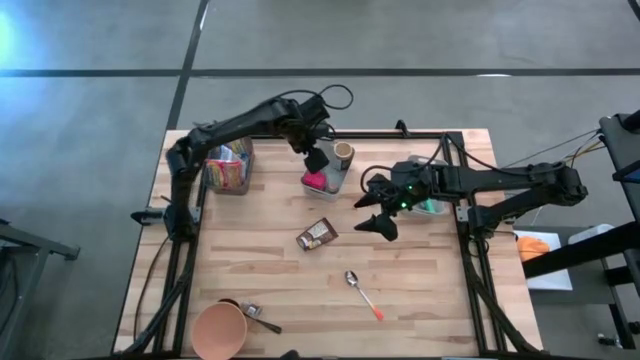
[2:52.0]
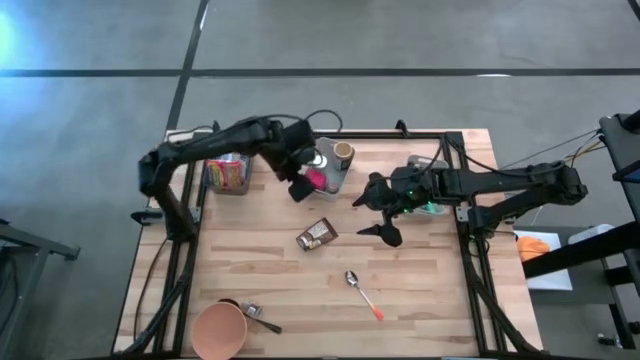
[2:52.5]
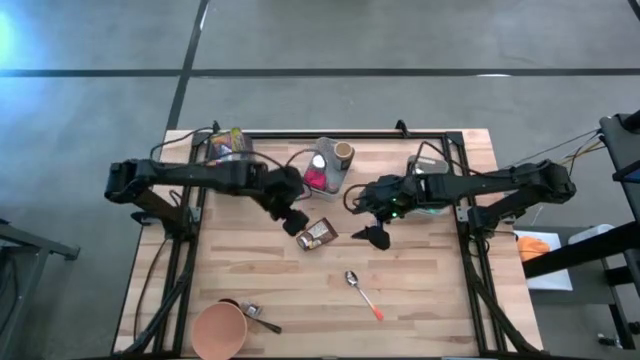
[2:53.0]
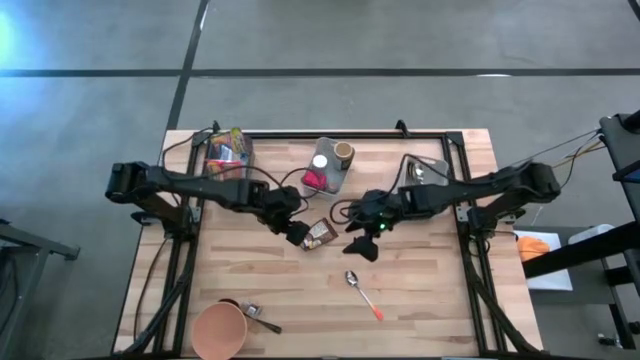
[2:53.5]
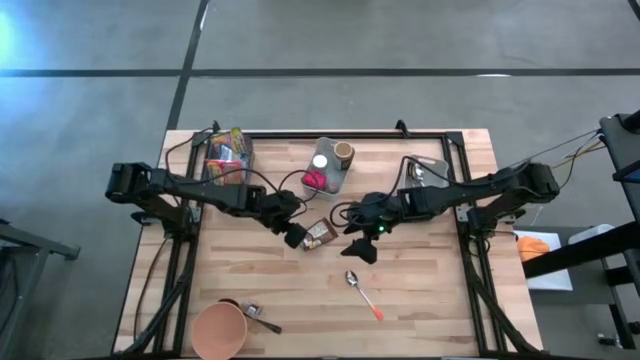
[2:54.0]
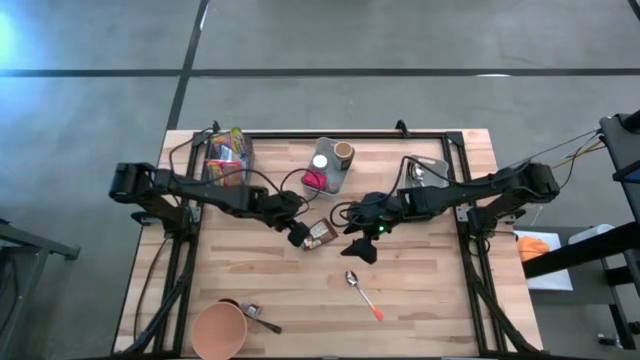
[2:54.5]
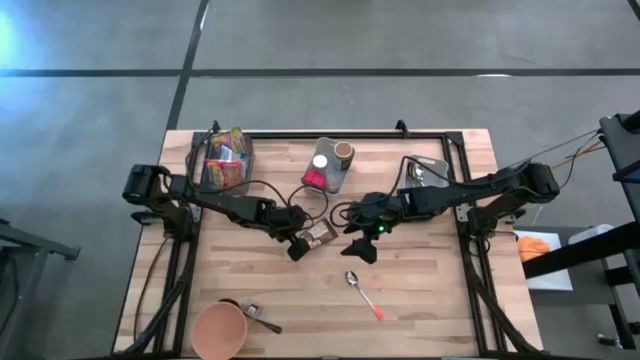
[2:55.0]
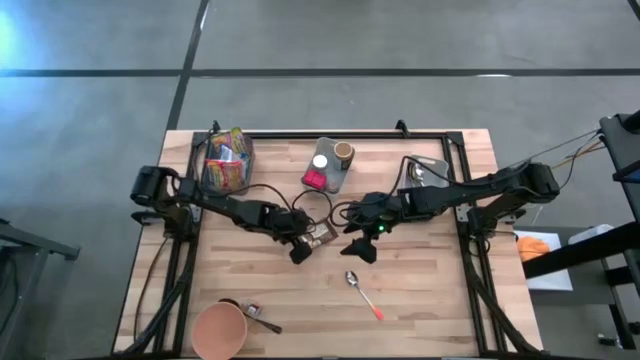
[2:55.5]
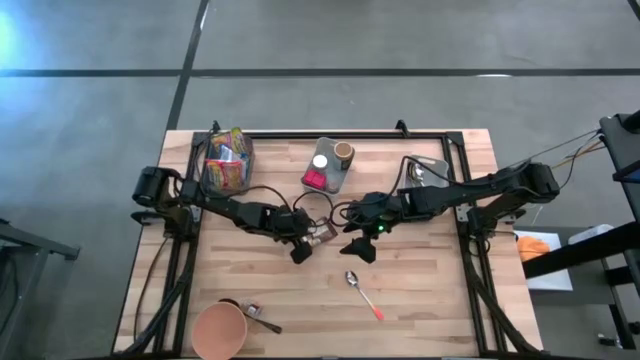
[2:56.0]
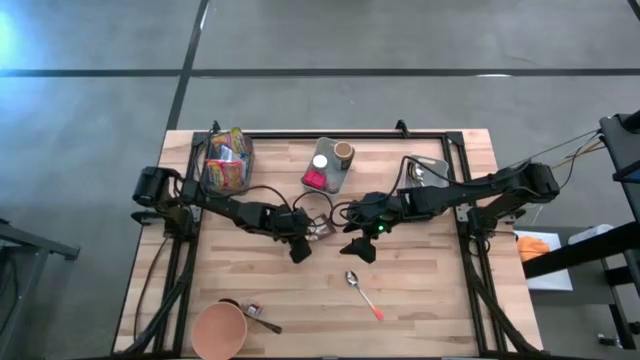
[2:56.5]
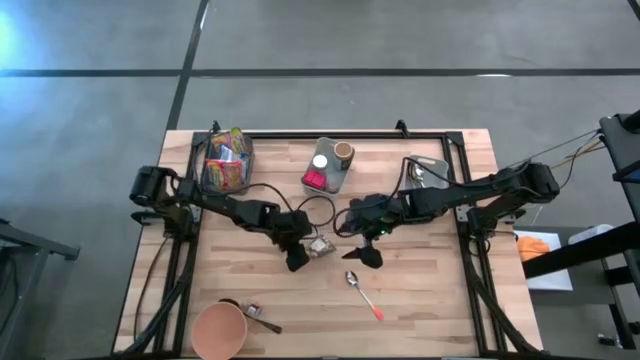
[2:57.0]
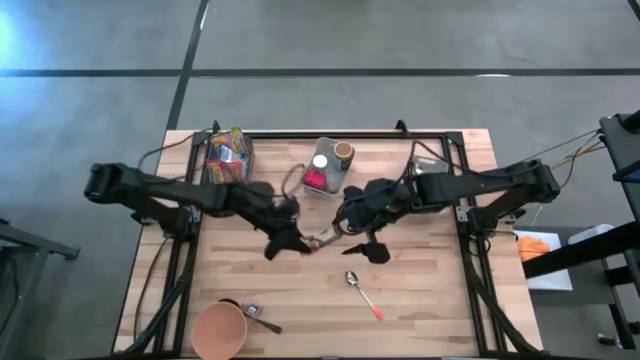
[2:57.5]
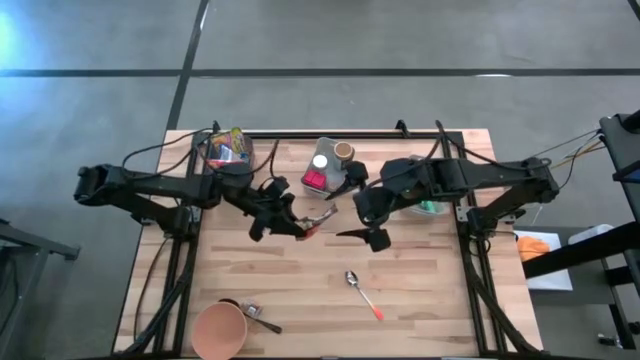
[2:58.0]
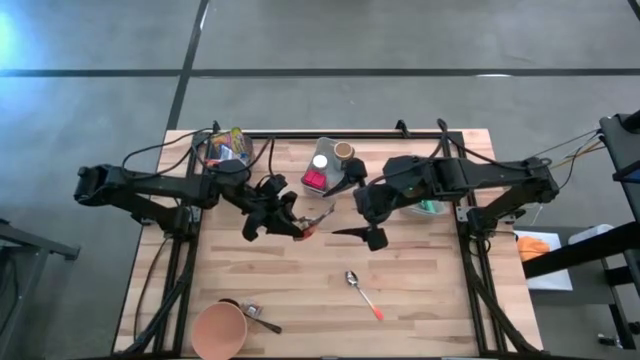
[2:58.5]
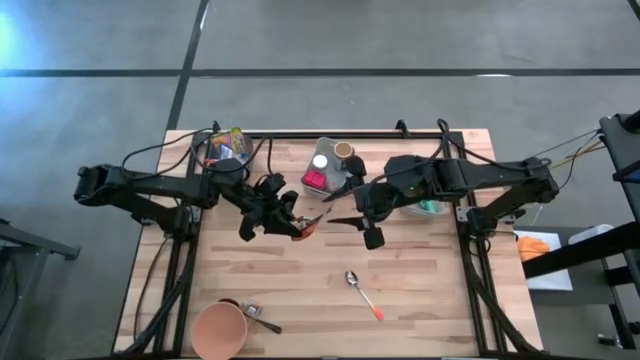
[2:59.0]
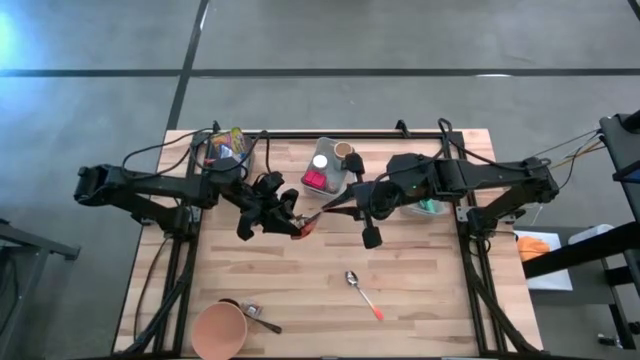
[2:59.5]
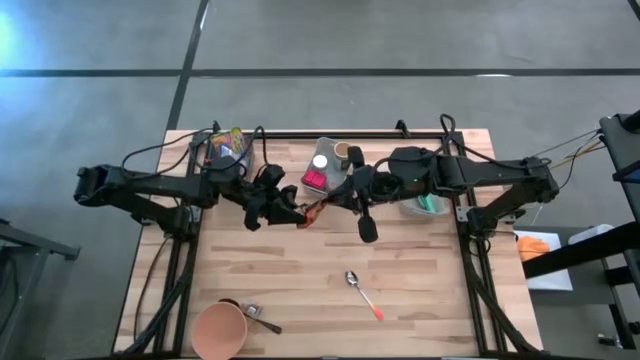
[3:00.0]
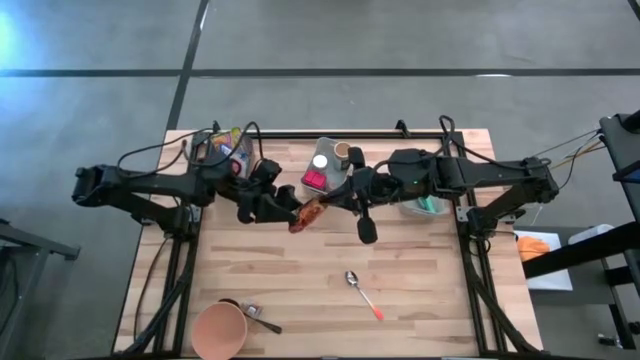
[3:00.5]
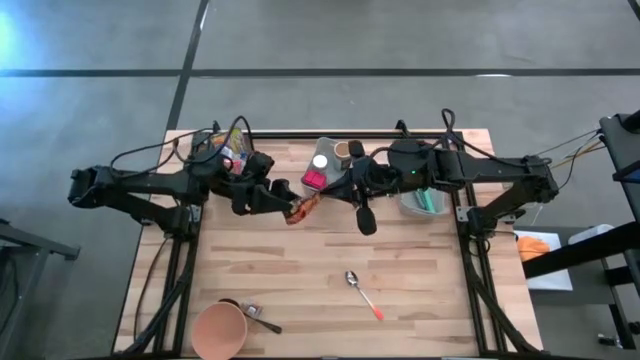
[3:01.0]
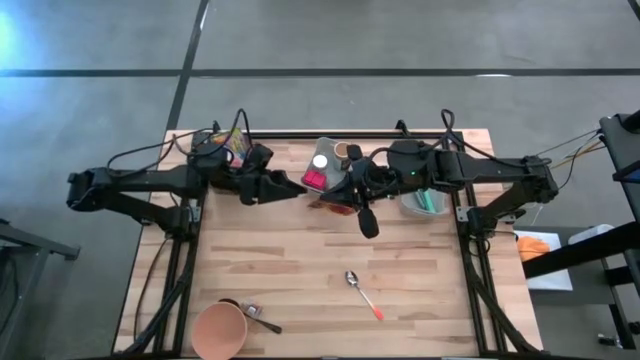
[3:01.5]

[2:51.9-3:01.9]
Put the orange seasoning pack into the left gray bin

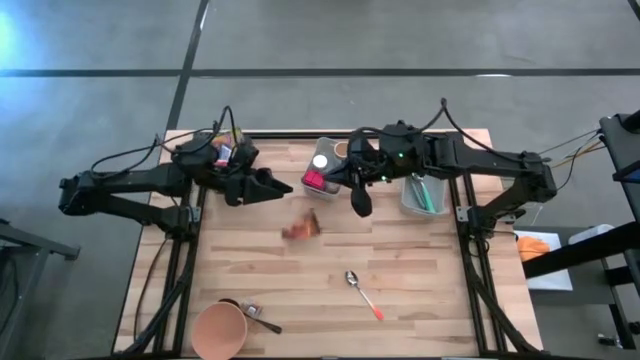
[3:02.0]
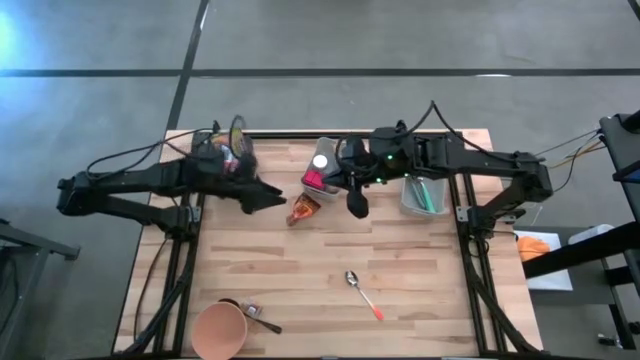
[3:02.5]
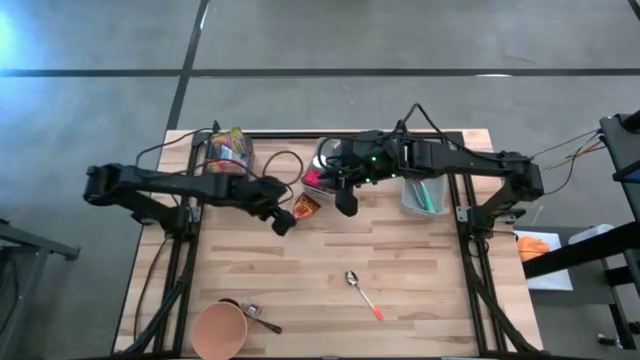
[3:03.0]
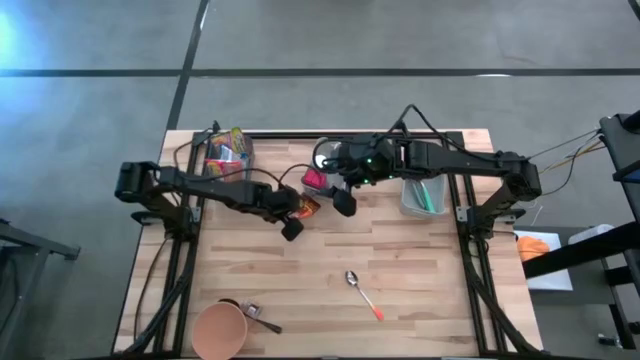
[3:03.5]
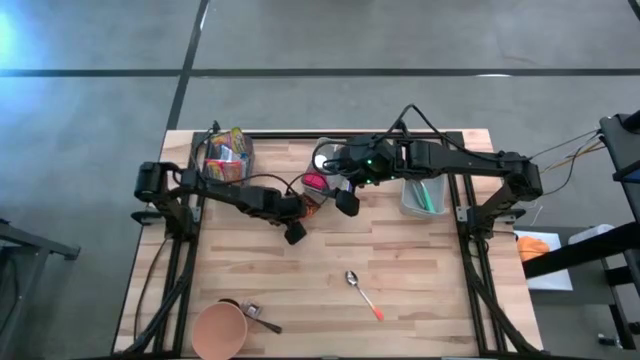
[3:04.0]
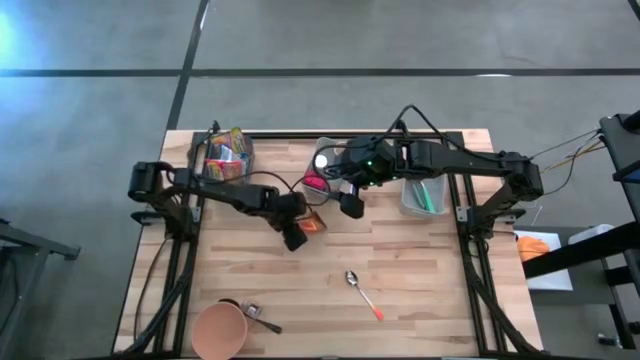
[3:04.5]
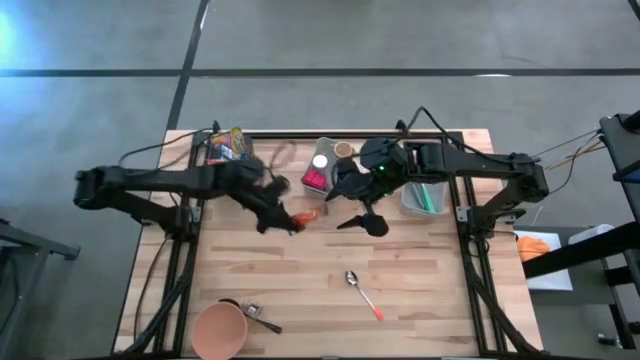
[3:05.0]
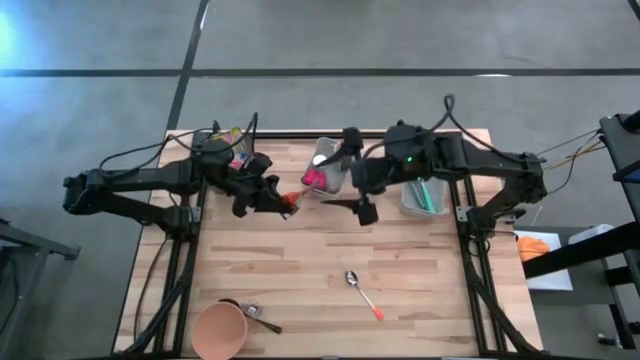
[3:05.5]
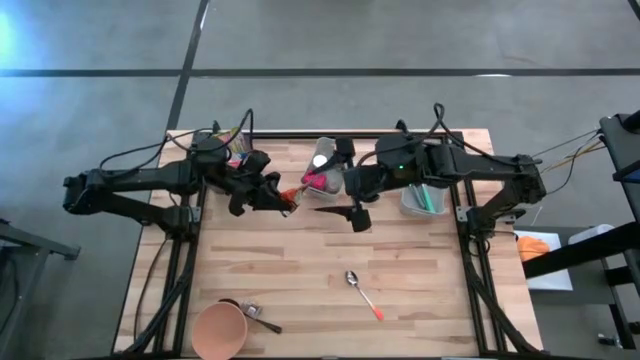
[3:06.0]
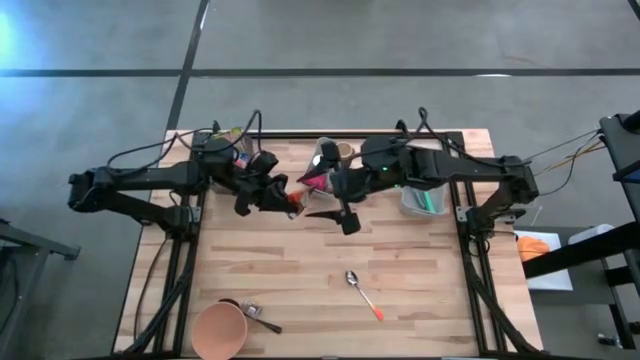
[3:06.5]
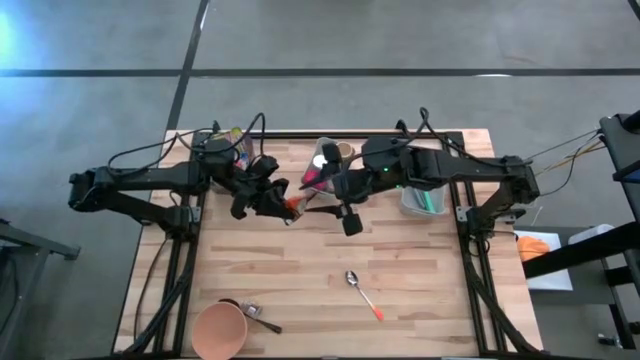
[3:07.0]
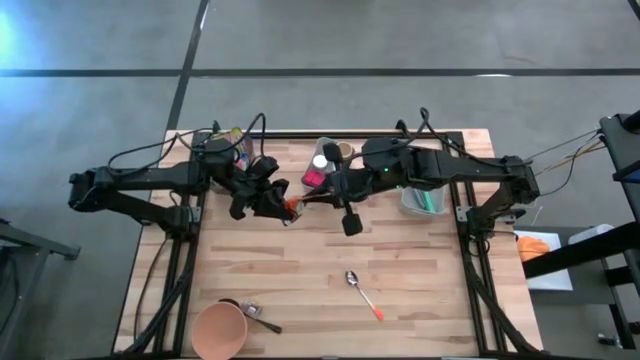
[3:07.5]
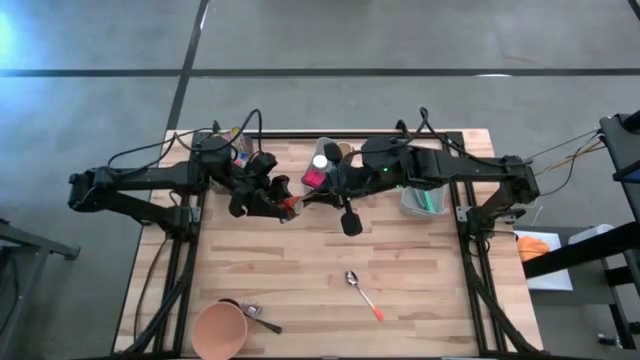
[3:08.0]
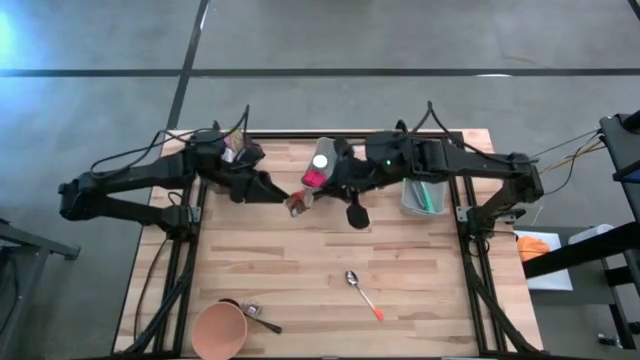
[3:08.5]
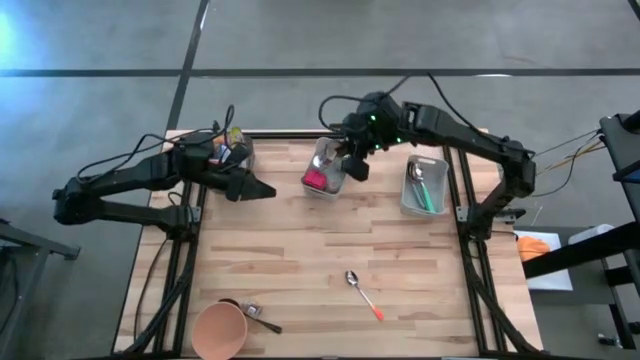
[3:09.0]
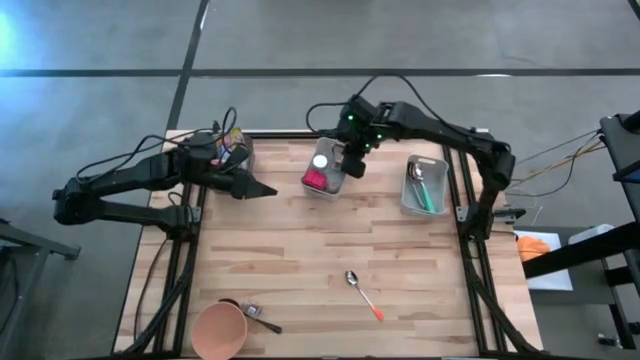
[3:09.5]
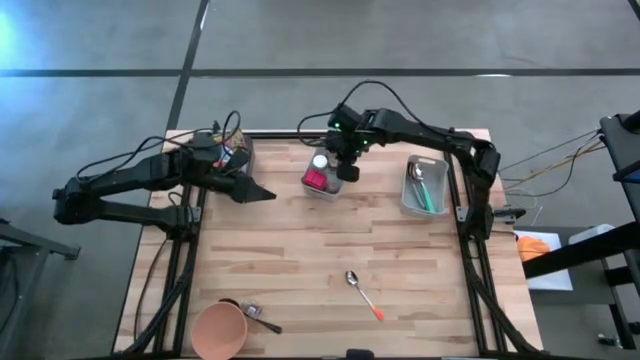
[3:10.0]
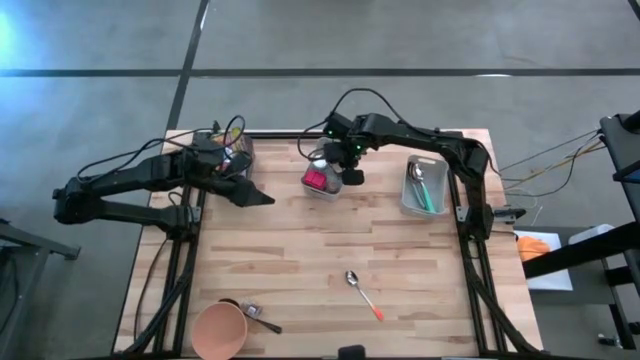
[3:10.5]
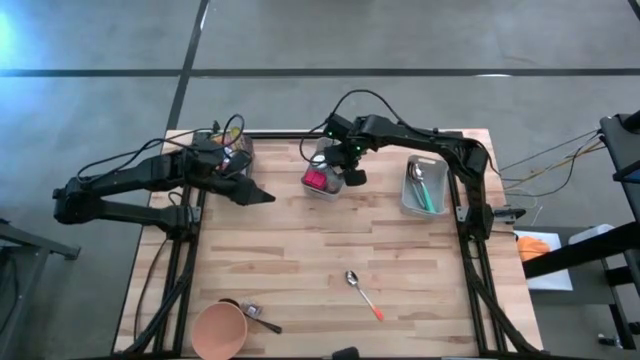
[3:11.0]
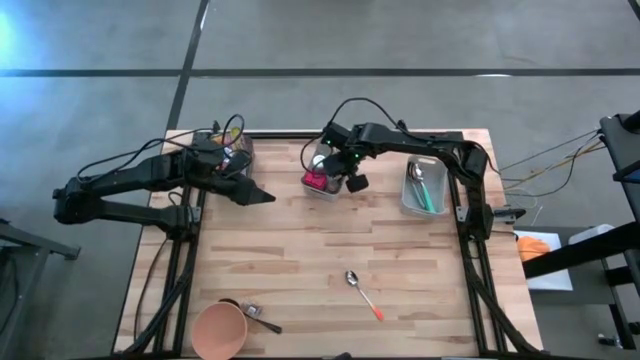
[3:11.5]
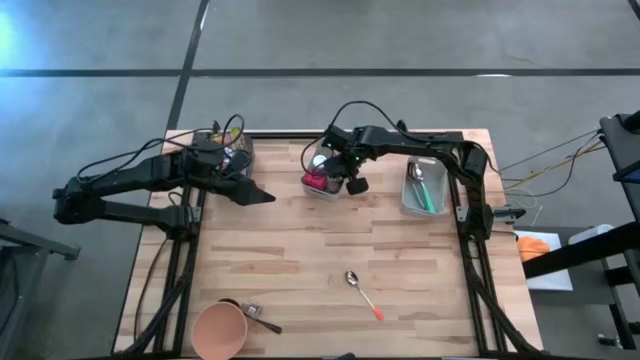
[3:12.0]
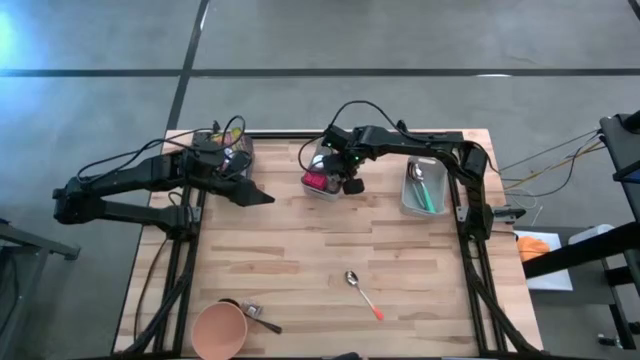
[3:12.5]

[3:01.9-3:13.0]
Put the orange seasoning pack into the left gray bin
